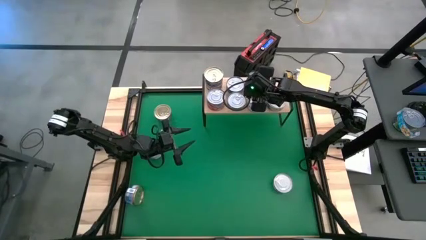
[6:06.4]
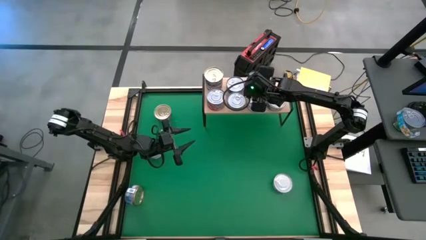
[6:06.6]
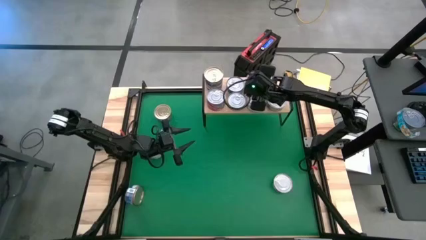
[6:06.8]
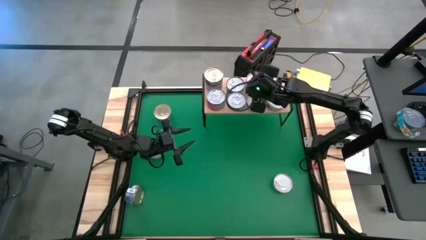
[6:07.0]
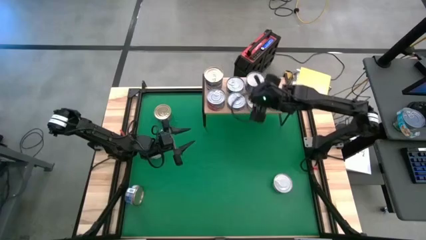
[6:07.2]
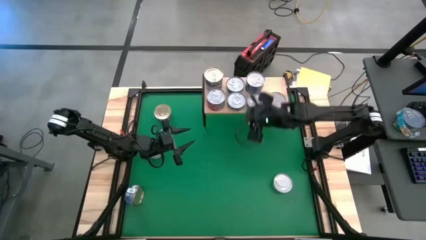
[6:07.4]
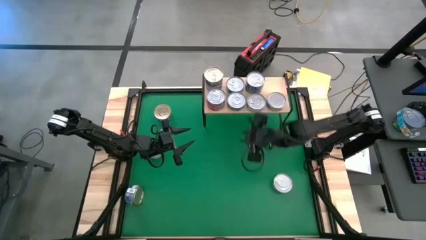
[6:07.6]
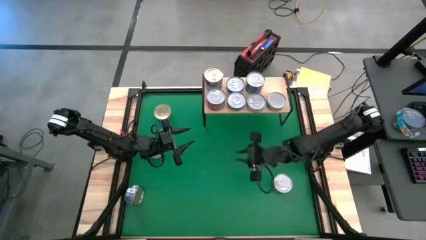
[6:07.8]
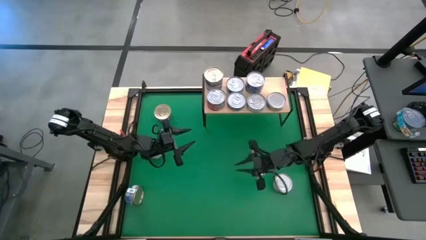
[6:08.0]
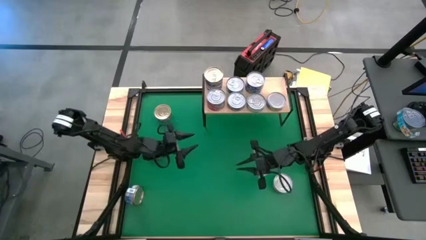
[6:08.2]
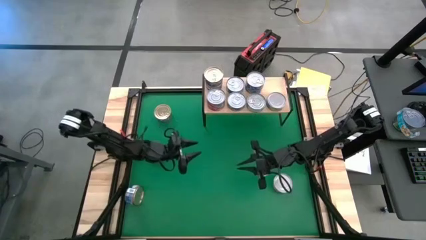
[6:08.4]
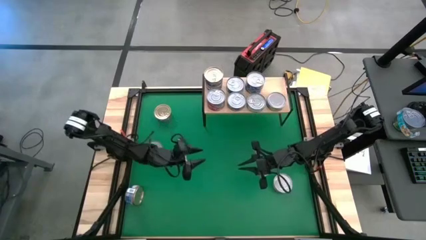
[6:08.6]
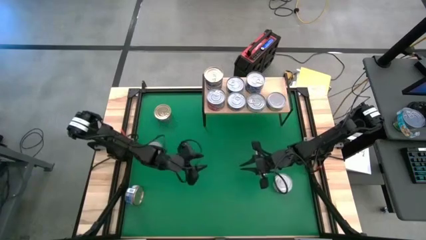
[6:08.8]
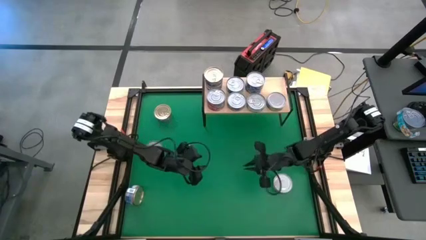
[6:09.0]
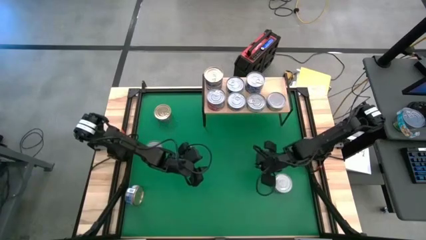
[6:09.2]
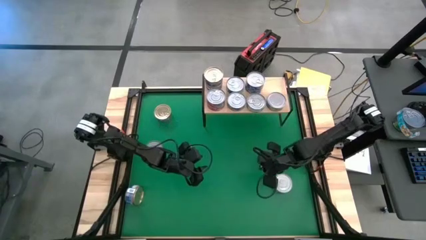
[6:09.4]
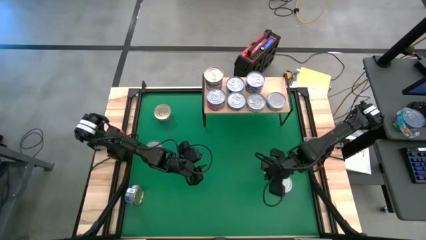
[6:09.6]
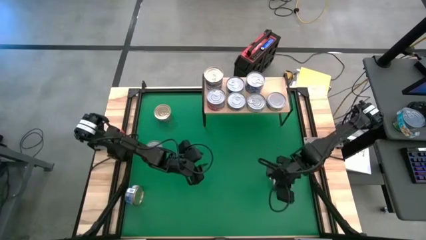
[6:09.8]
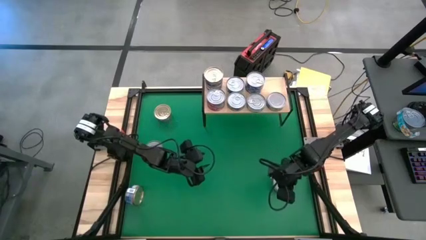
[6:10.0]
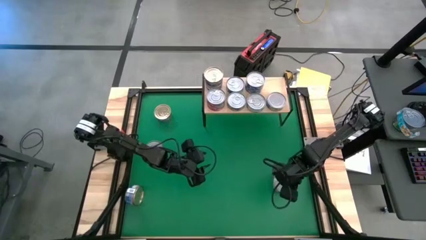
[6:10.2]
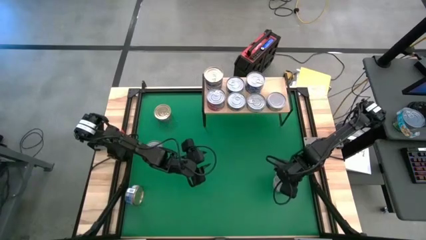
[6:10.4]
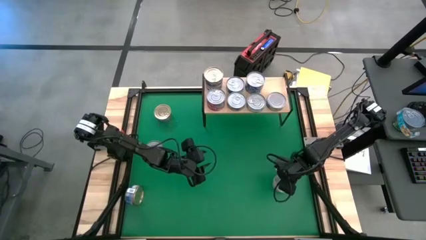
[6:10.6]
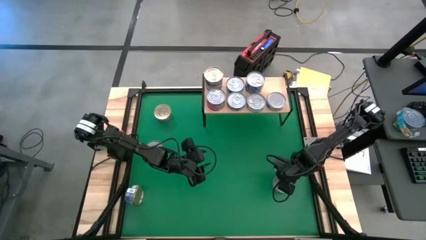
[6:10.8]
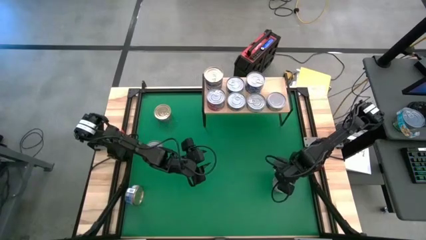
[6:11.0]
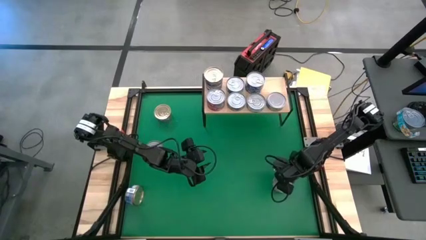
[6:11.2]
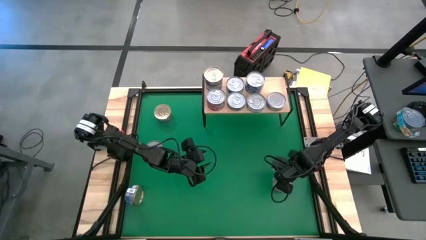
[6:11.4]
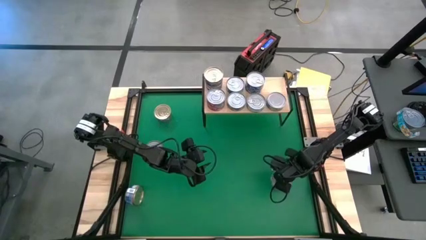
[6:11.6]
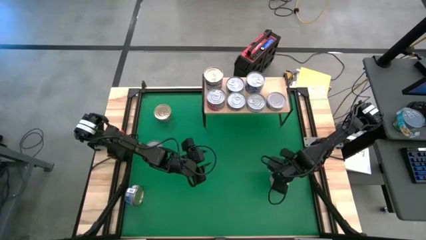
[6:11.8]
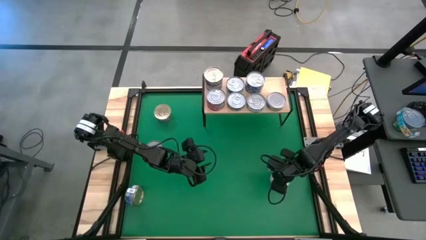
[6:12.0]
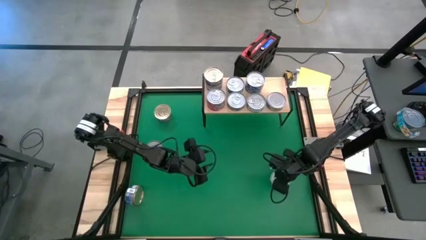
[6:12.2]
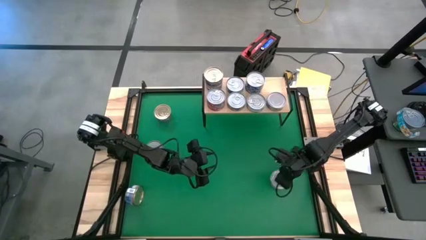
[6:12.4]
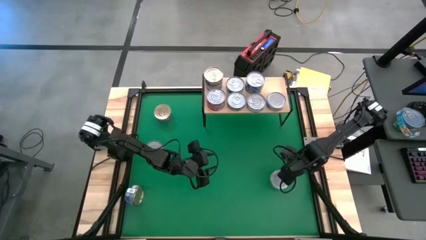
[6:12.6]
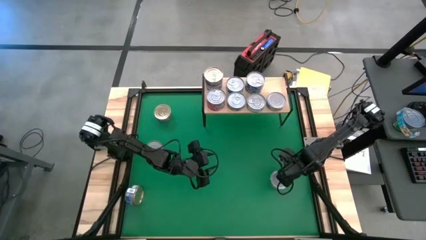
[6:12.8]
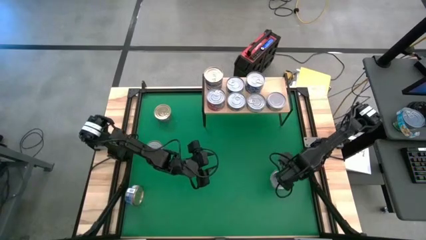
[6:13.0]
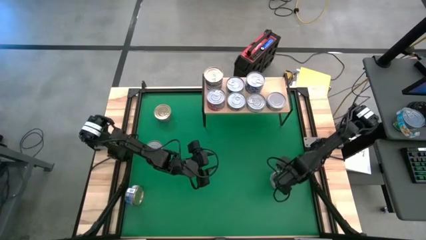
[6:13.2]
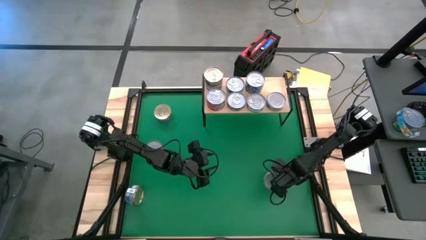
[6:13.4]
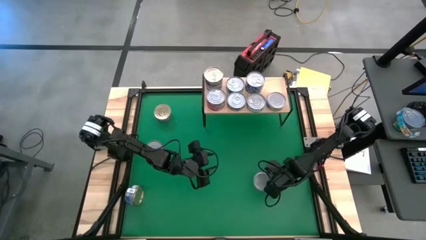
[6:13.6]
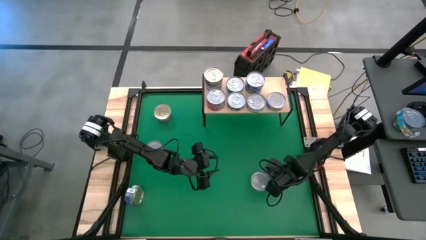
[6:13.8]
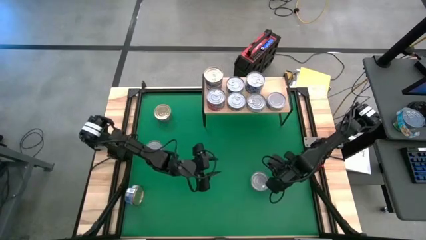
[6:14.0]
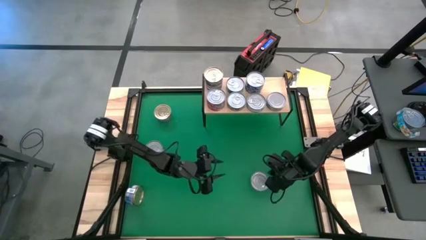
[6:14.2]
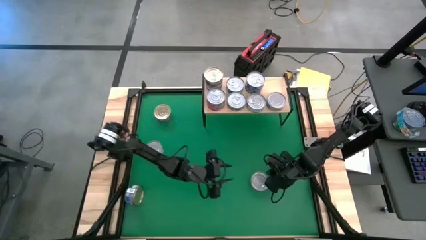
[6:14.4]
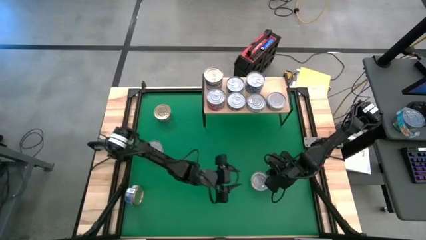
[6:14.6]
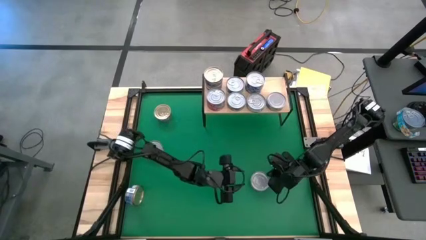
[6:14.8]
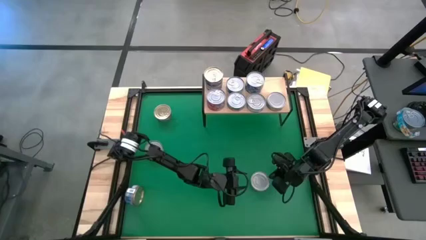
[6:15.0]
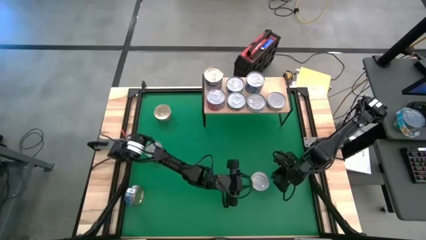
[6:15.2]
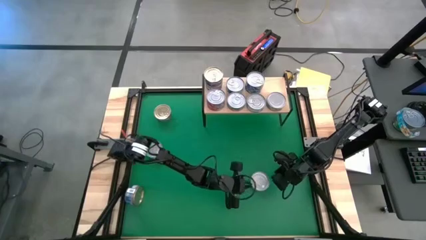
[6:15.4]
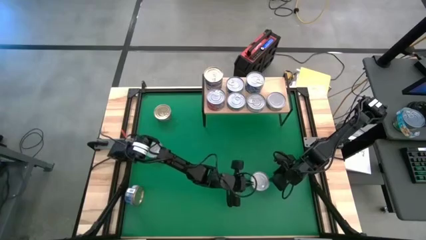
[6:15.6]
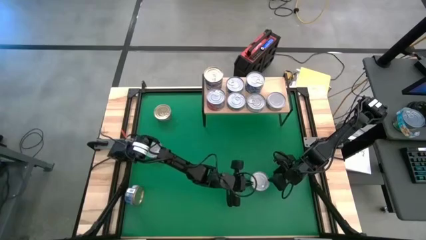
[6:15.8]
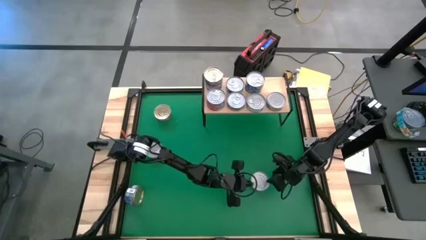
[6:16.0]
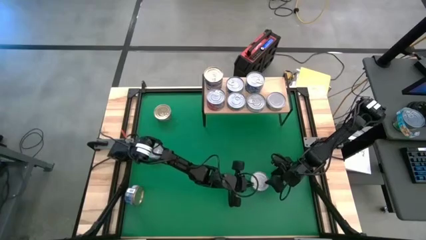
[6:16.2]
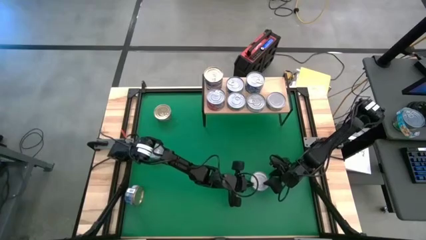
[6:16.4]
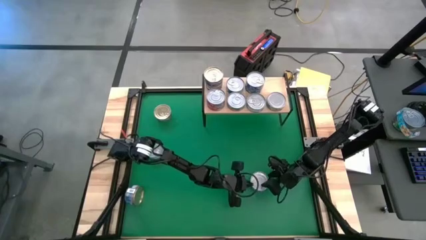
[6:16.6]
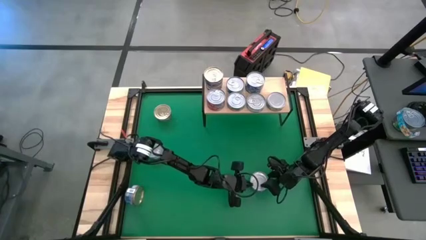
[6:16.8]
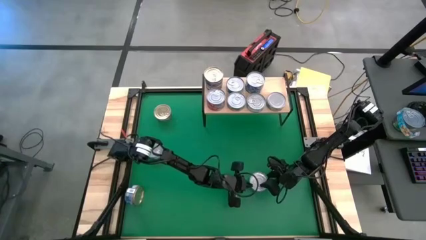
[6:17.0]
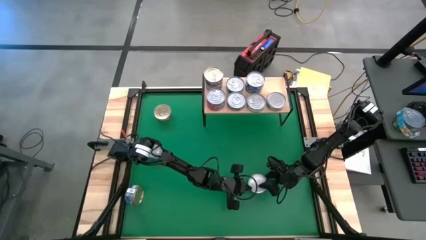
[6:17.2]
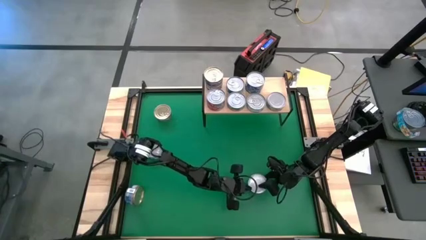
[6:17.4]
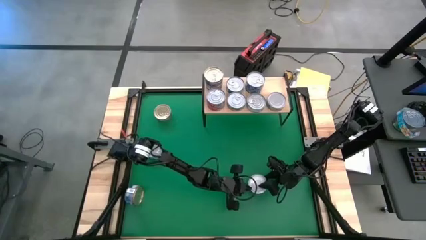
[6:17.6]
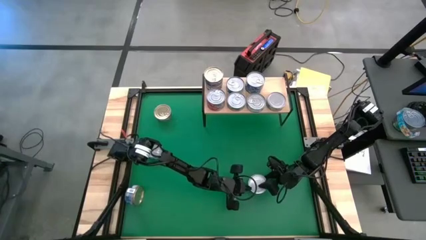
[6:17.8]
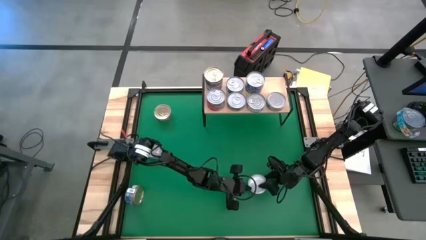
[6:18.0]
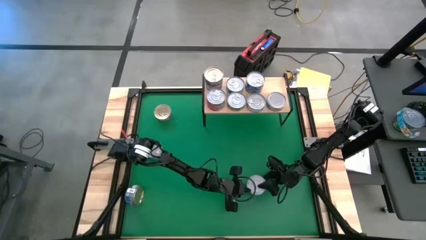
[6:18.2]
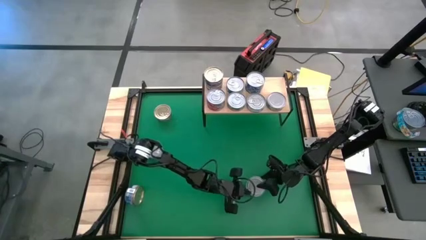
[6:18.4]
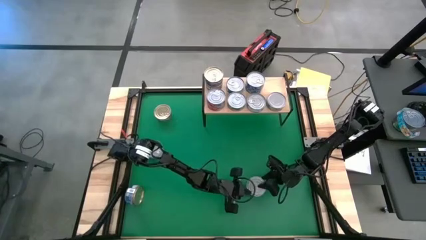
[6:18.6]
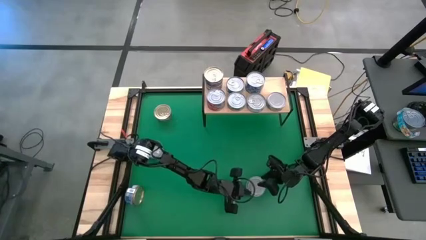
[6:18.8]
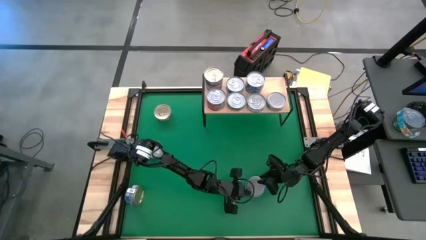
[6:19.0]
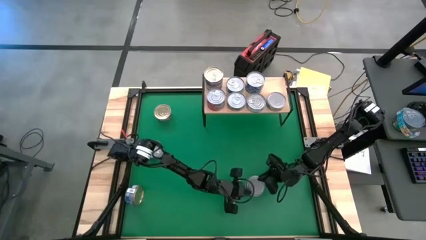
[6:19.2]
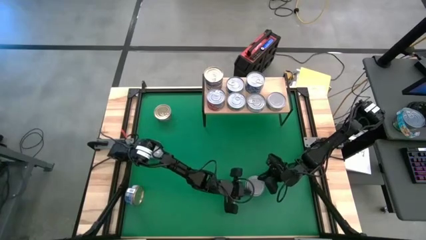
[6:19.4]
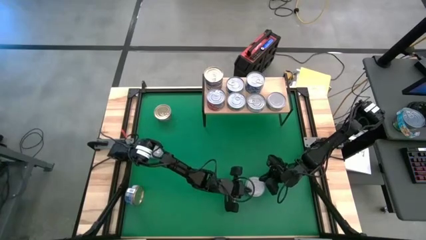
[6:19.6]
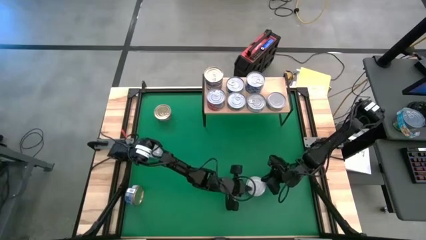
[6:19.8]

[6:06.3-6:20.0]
Task: Stack canned seafood by type on shelf
Stack the green tuna can on top of the other green tuna can on the shelf
